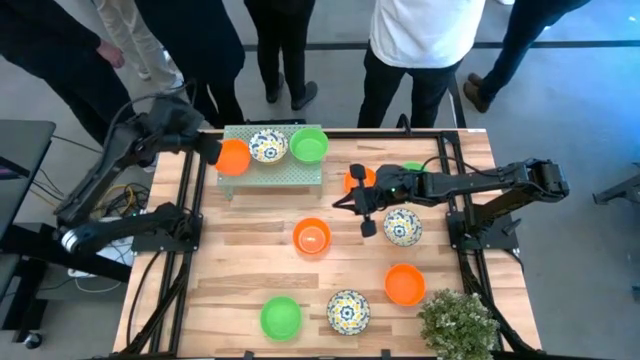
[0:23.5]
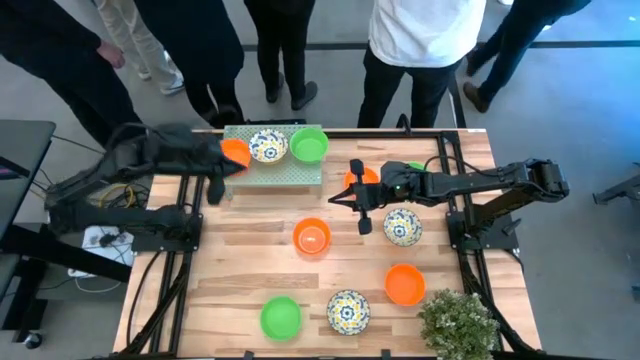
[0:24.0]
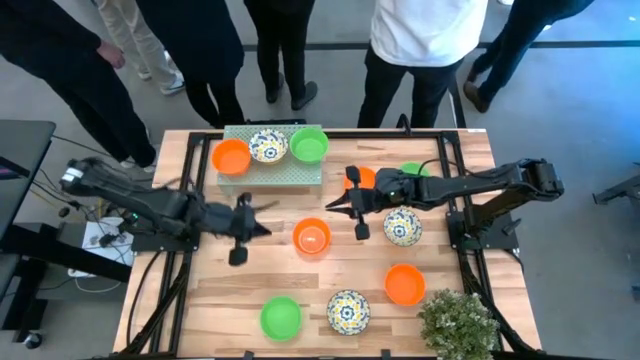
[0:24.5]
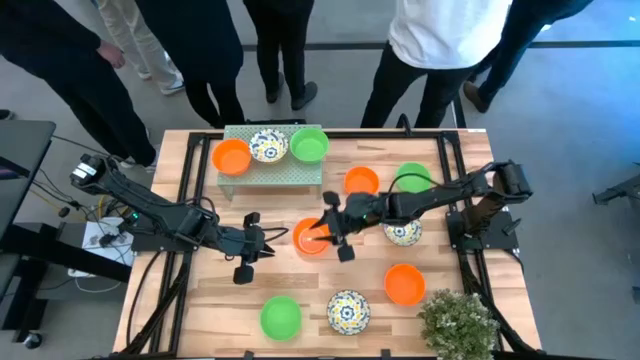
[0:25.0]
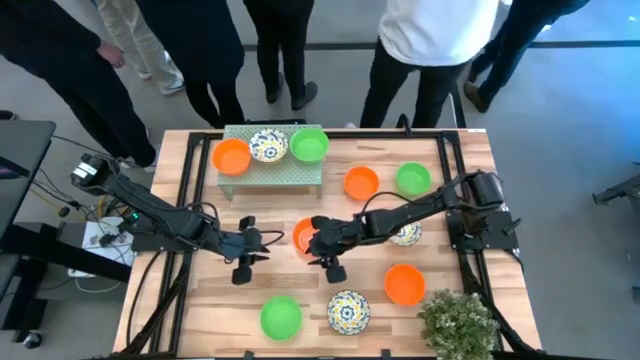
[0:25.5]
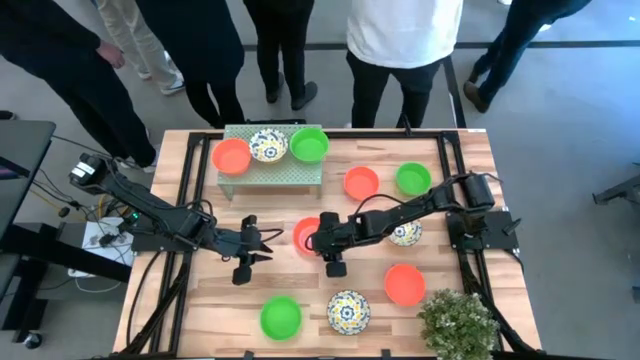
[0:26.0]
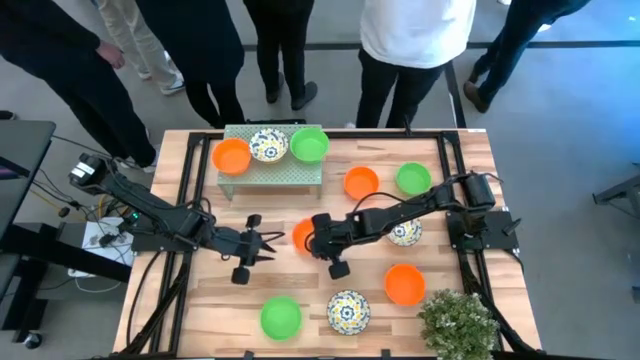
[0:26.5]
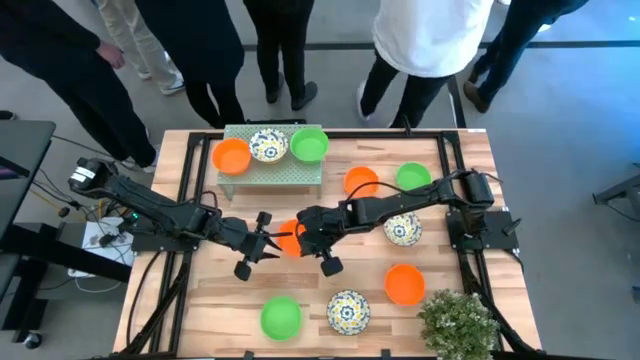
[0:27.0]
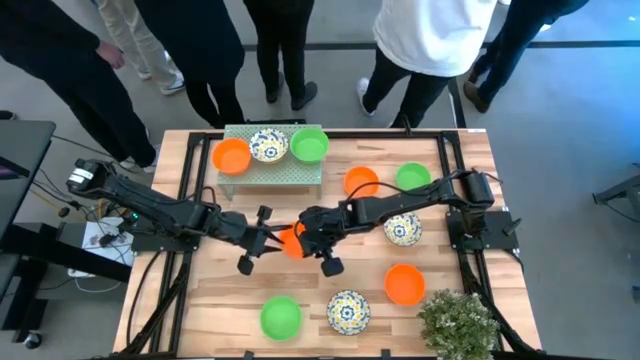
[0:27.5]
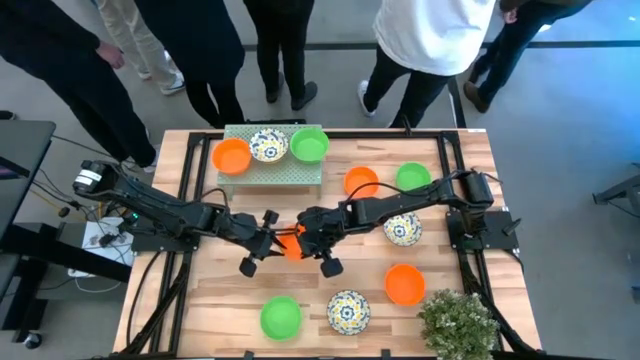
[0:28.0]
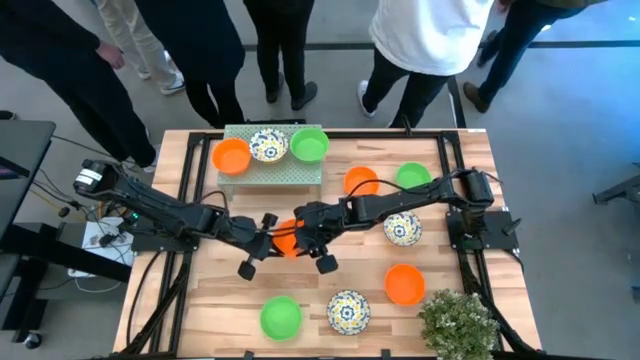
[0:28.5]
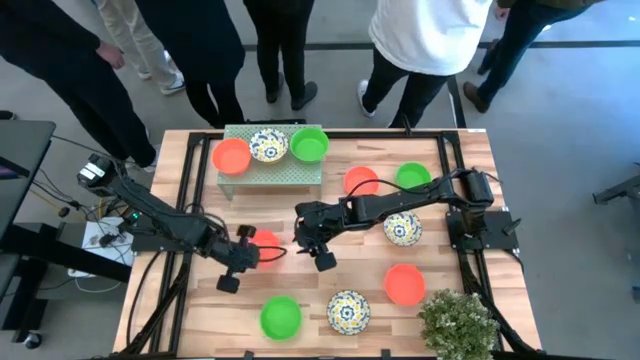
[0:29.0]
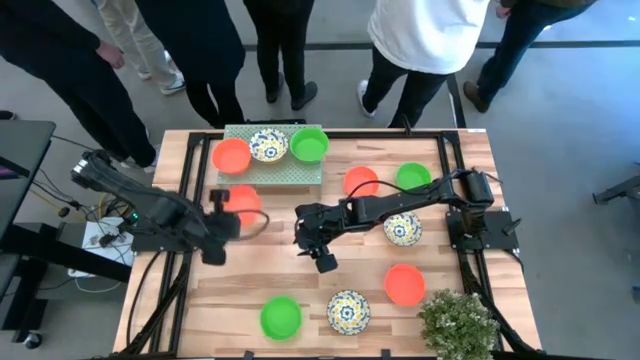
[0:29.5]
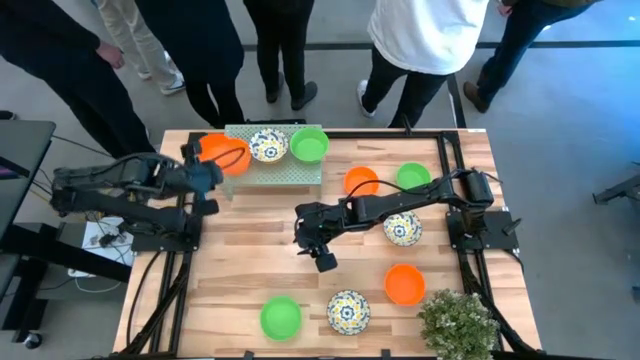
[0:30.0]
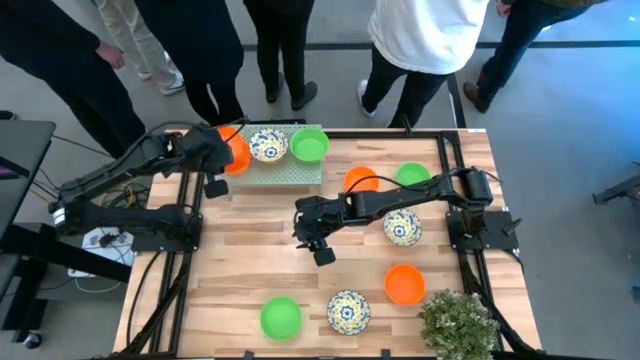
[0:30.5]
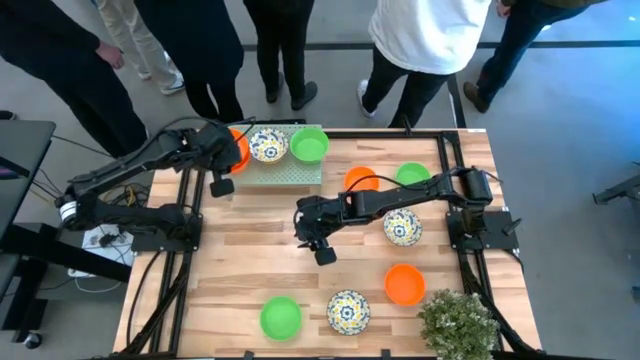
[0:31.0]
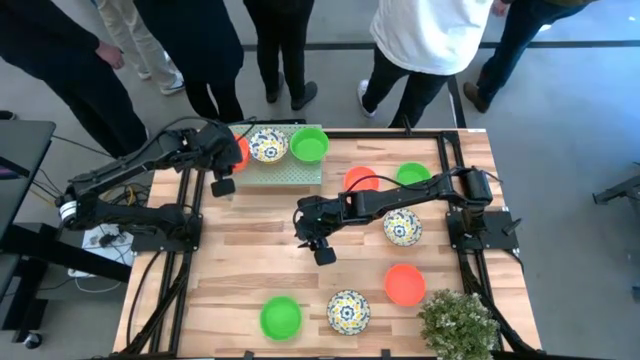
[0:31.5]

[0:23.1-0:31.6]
Task: Pick & Place Mini bowls
Stack the orange bowl on top of the other orange bowl on the shelf

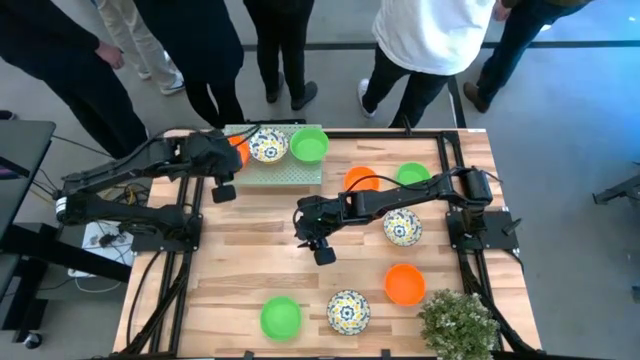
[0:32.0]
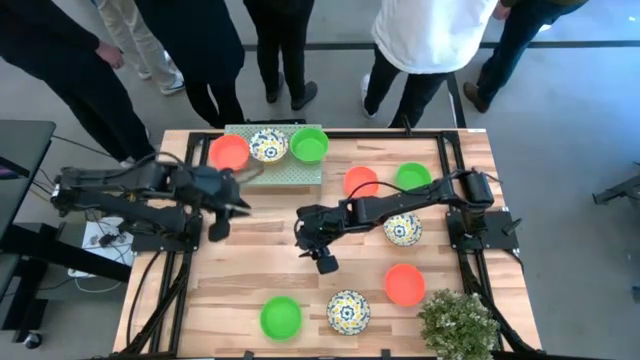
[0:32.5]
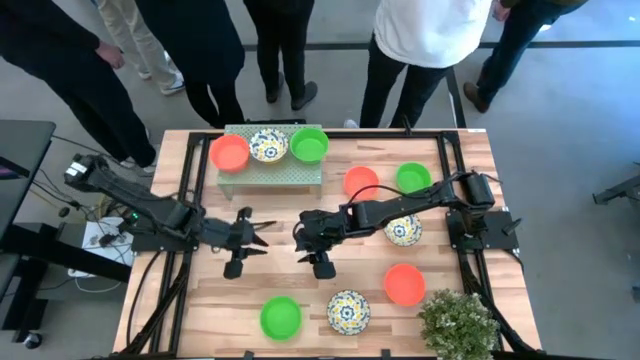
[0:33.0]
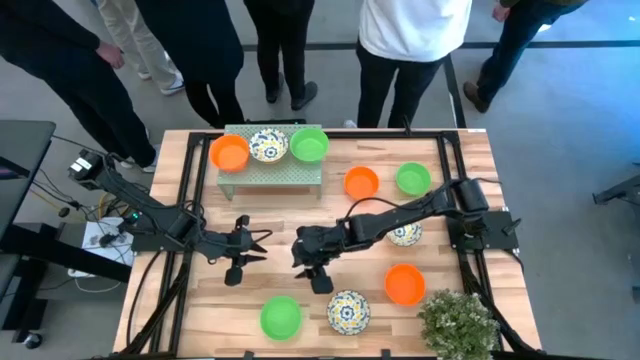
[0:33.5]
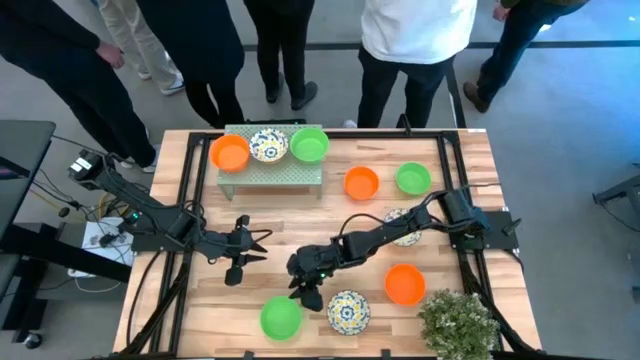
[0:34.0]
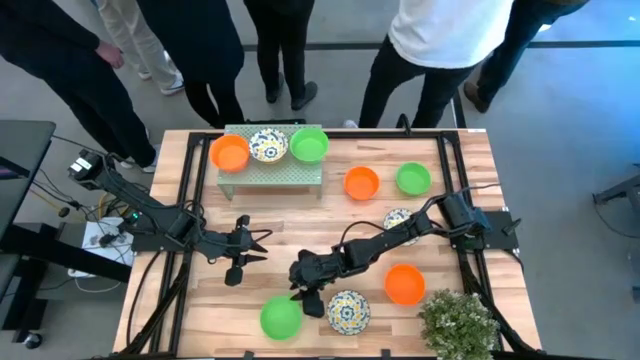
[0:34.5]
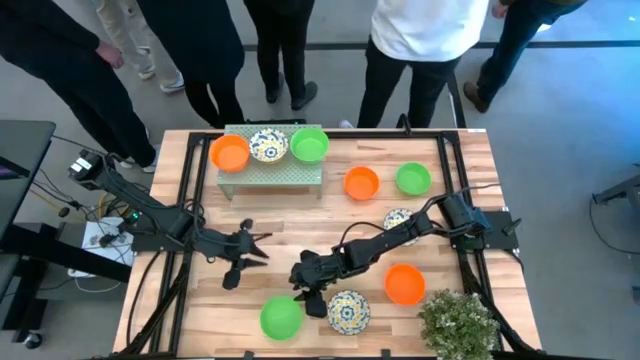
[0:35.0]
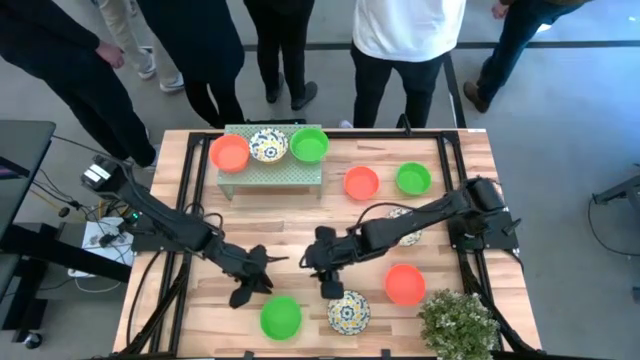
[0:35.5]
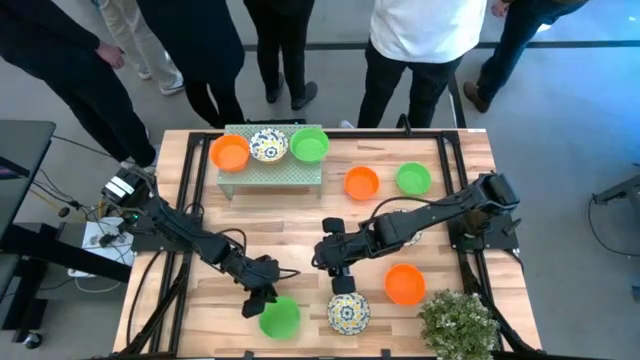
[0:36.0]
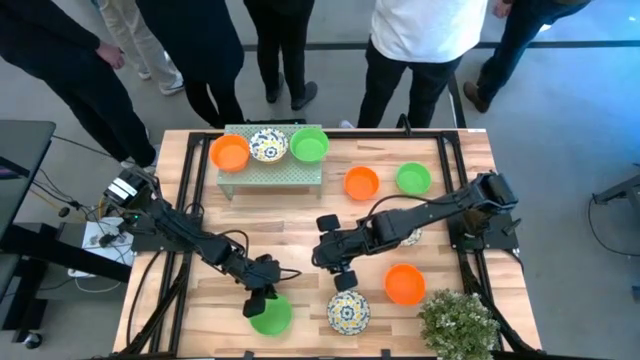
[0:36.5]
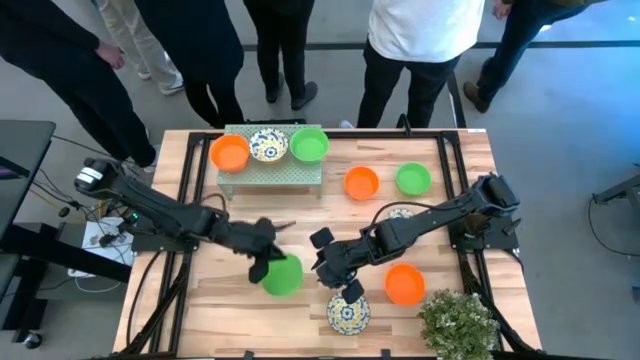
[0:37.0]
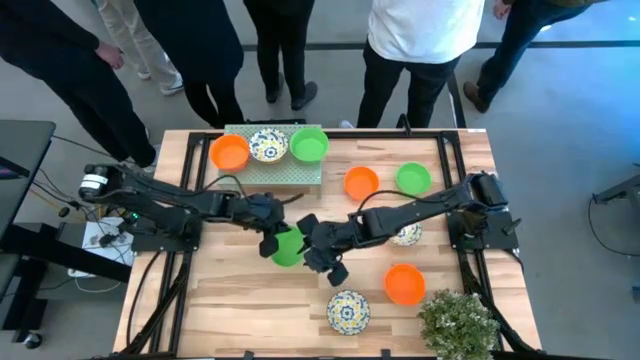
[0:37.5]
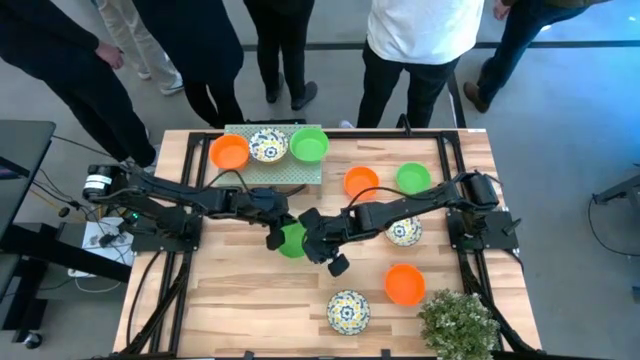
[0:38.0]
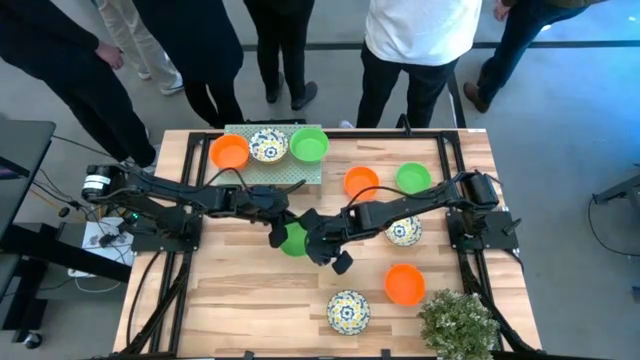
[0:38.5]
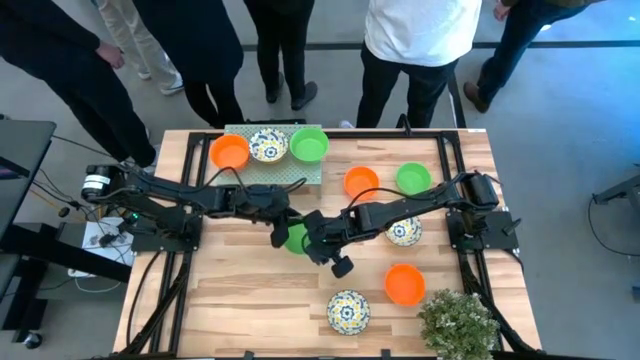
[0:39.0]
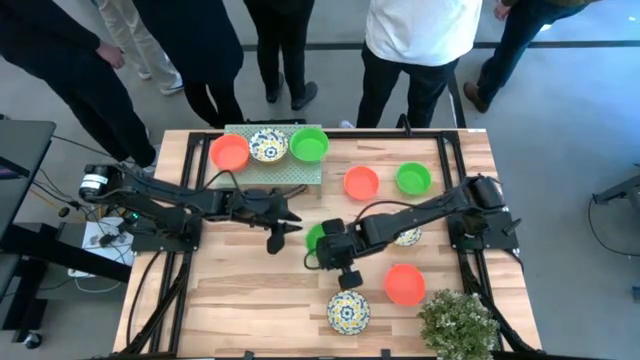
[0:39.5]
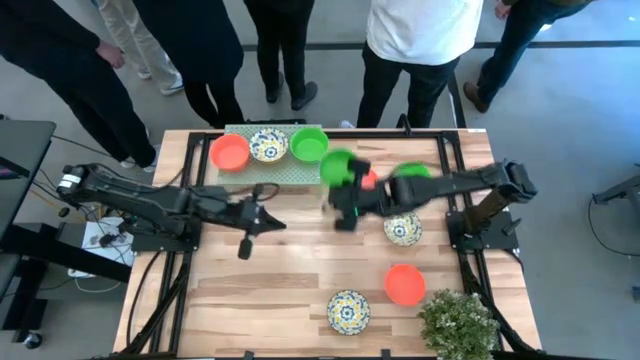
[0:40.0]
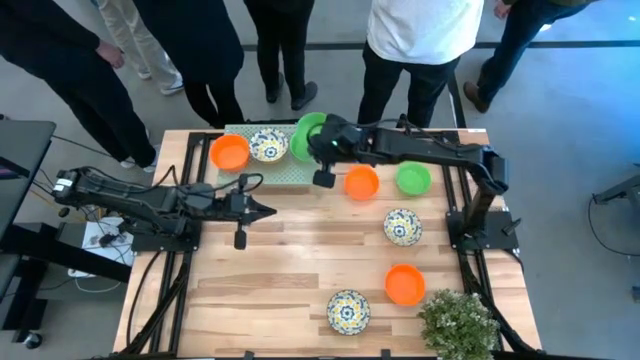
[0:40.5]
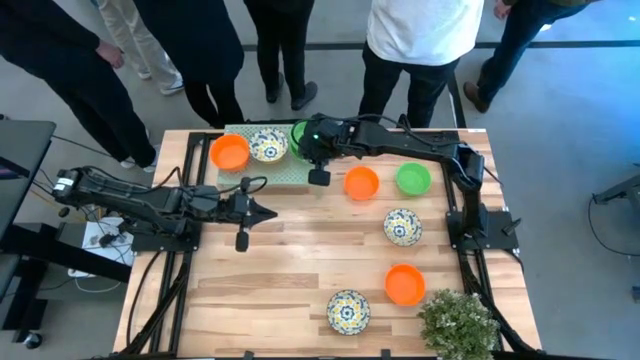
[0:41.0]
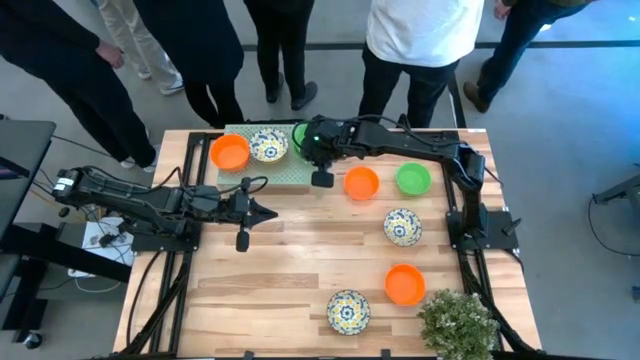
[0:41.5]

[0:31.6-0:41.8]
Stack the green bowl on top of the other green bowl on the shelf

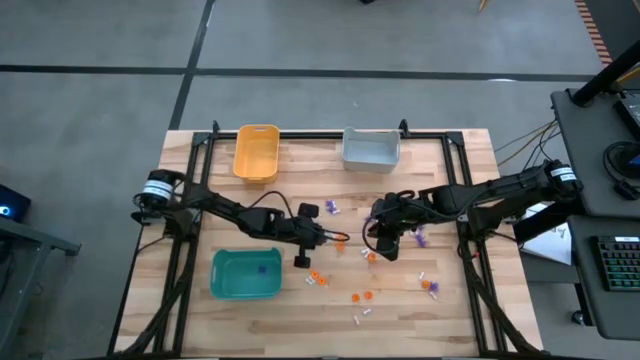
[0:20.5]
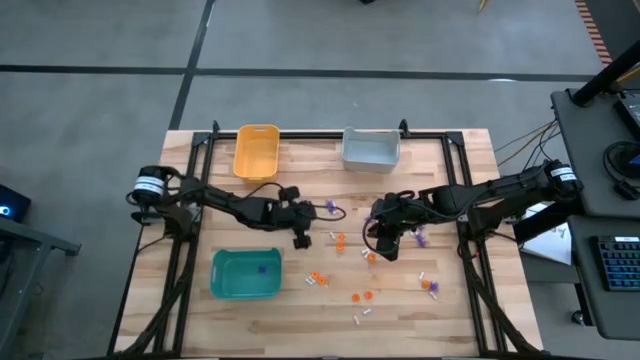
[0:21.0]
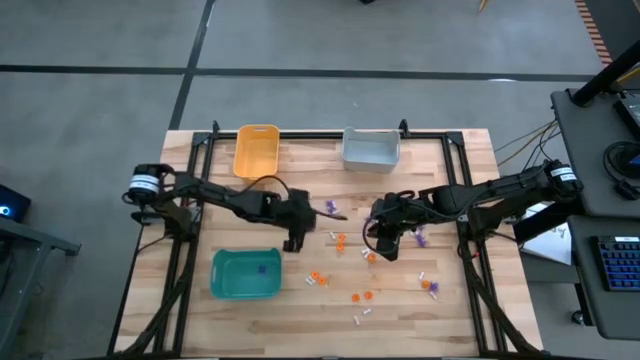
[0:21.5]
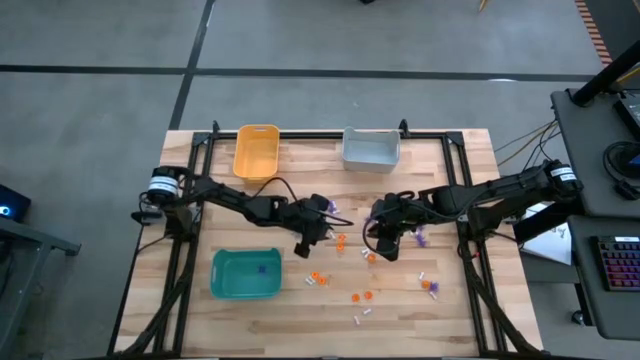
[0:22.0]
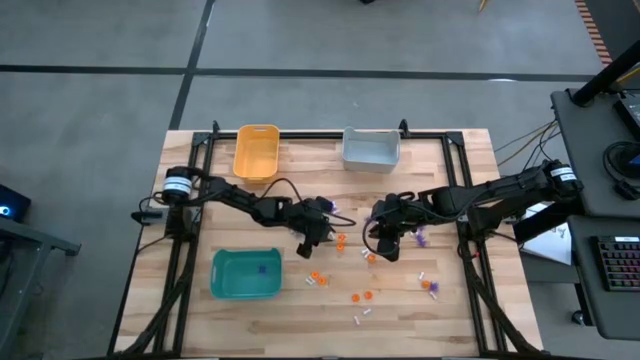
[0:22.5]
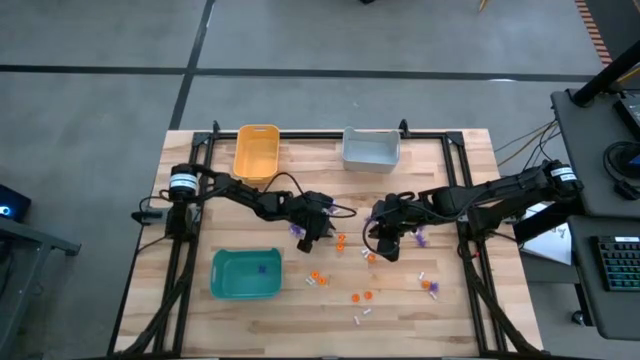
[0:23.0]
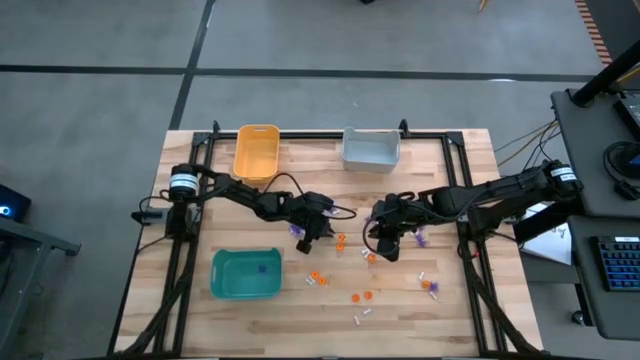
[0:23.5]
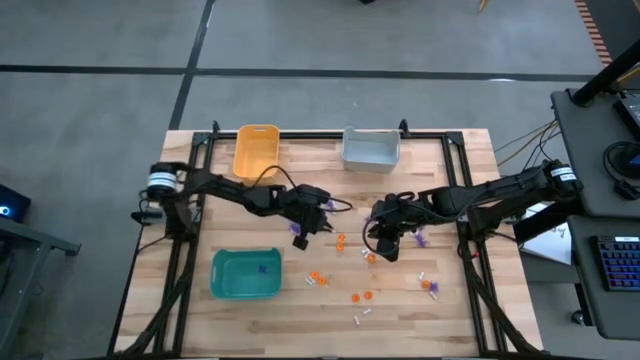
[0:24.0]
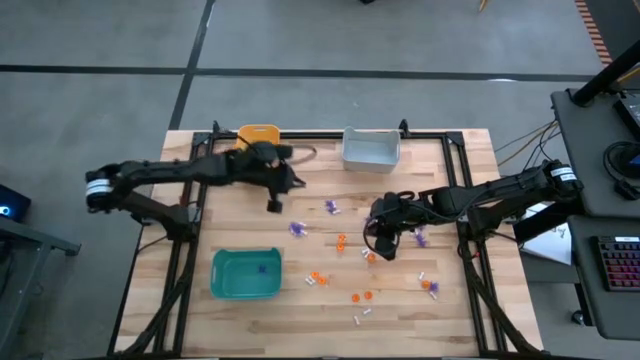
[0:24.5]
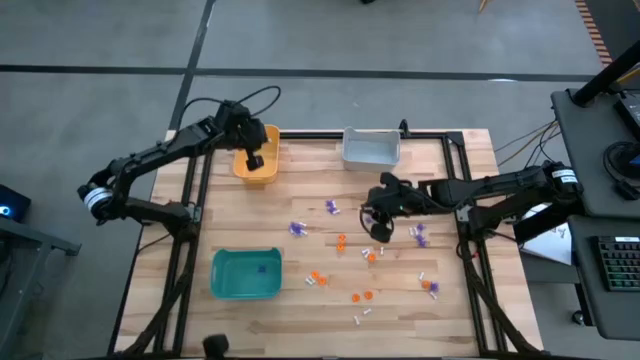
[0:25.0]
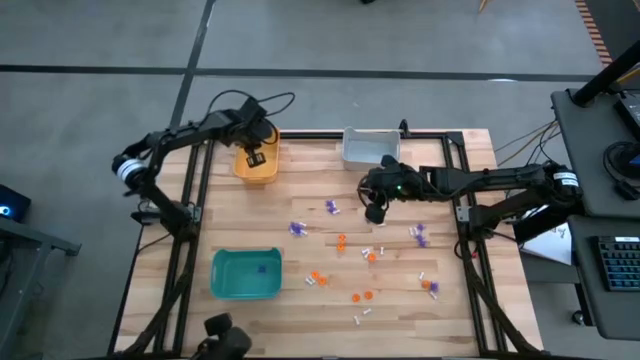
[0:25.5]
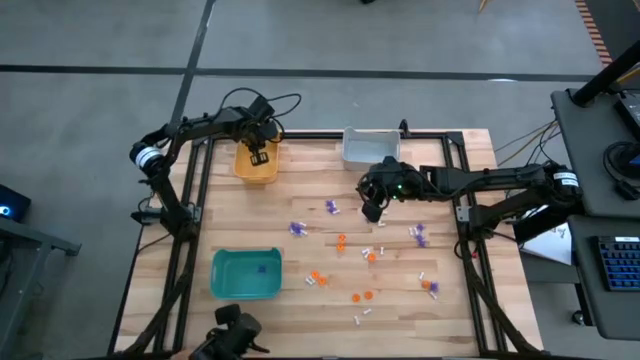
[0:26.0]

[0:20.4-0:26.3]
Task: Sort Halloween decoration
Put the white bone toy into the orange bin
